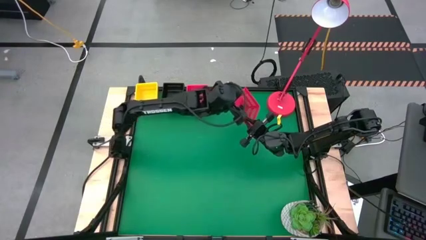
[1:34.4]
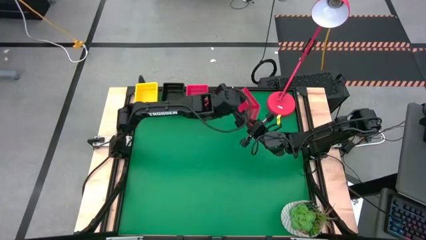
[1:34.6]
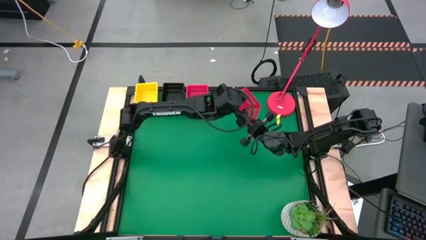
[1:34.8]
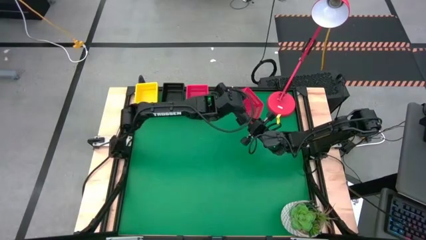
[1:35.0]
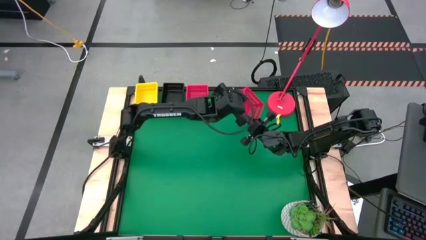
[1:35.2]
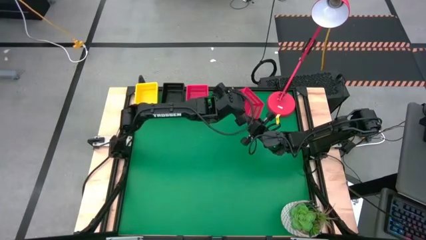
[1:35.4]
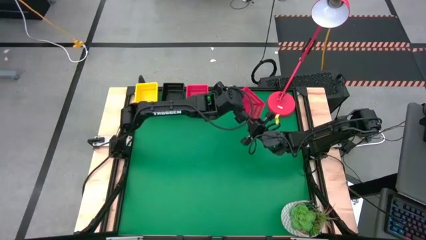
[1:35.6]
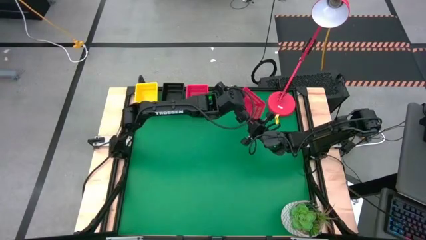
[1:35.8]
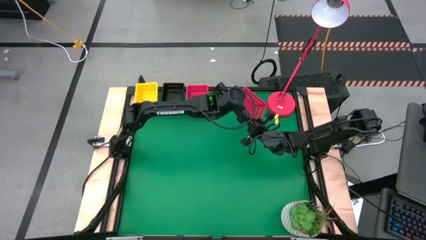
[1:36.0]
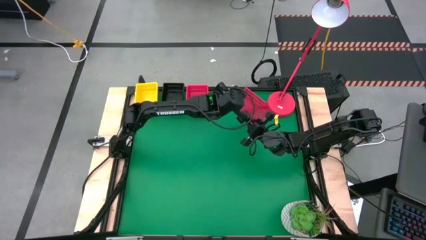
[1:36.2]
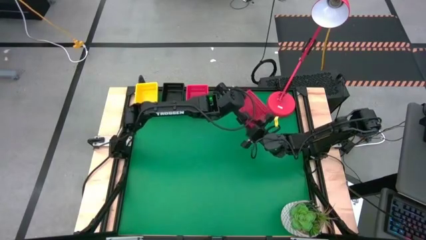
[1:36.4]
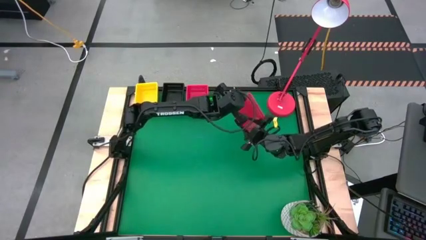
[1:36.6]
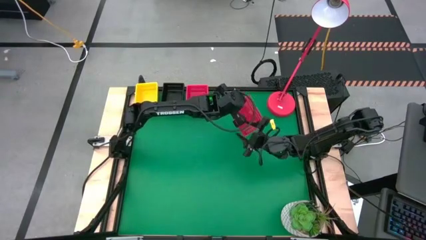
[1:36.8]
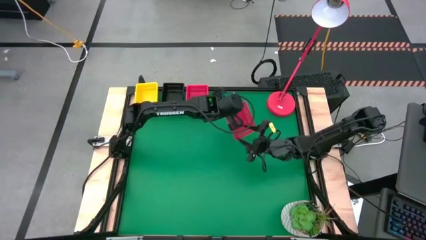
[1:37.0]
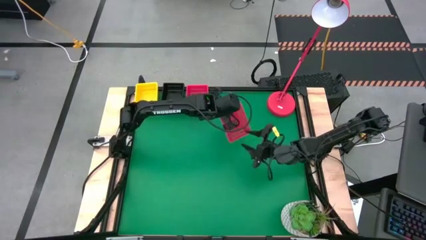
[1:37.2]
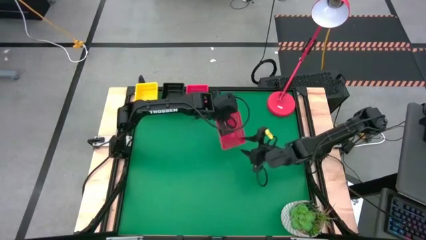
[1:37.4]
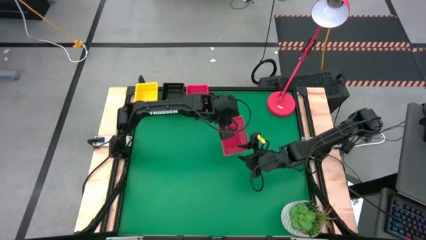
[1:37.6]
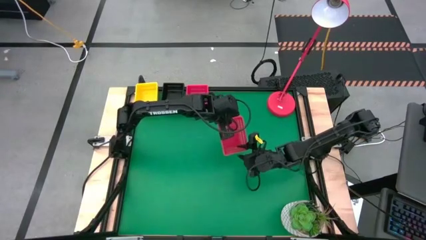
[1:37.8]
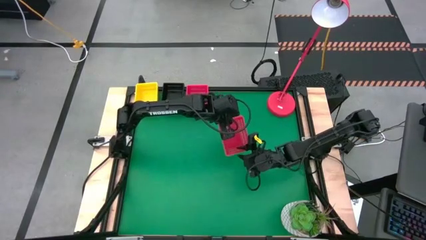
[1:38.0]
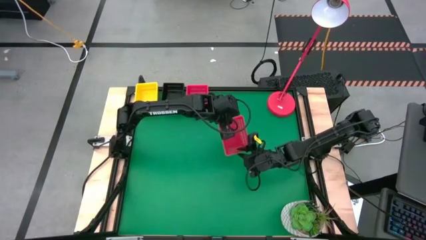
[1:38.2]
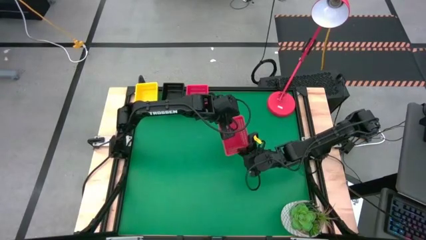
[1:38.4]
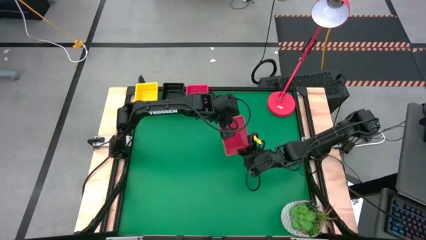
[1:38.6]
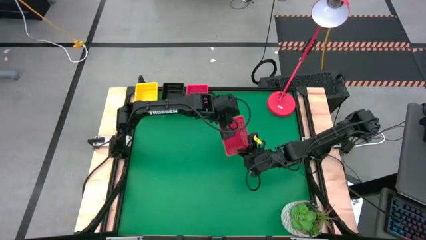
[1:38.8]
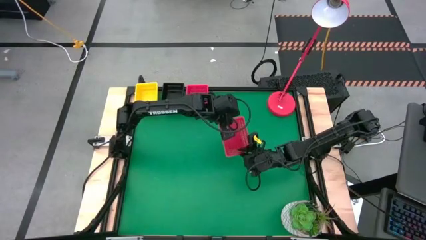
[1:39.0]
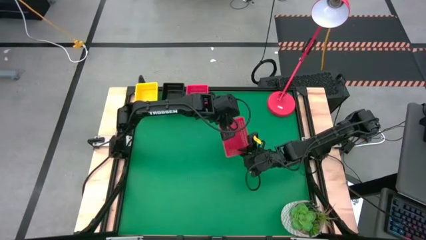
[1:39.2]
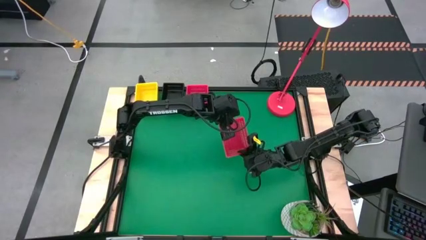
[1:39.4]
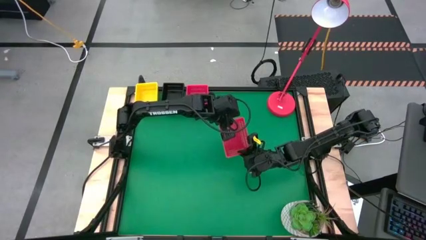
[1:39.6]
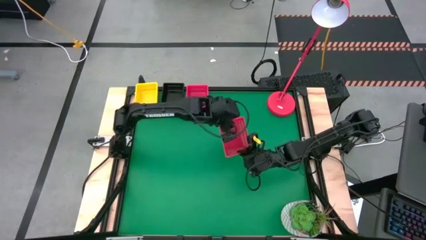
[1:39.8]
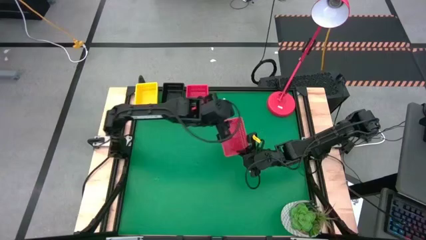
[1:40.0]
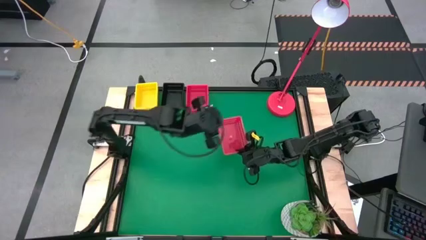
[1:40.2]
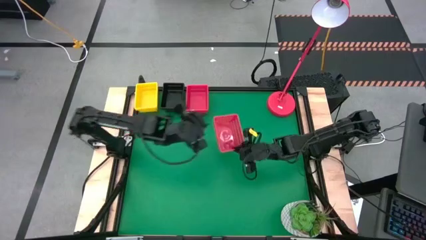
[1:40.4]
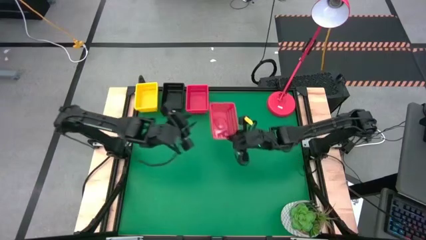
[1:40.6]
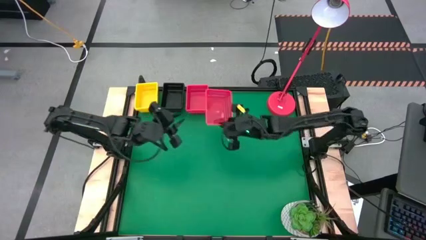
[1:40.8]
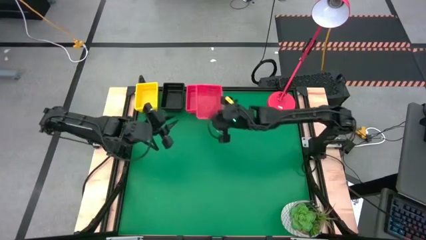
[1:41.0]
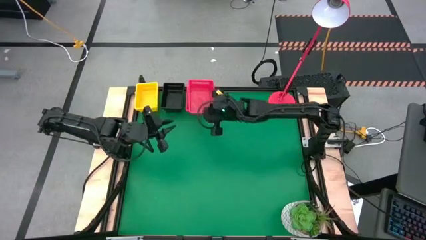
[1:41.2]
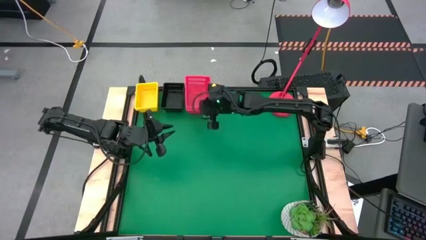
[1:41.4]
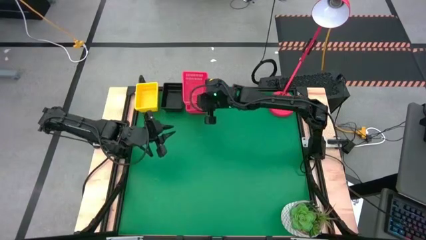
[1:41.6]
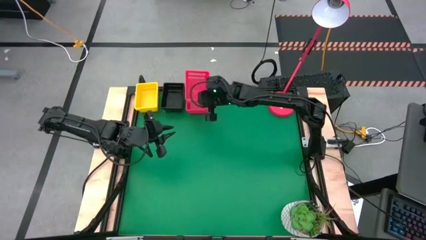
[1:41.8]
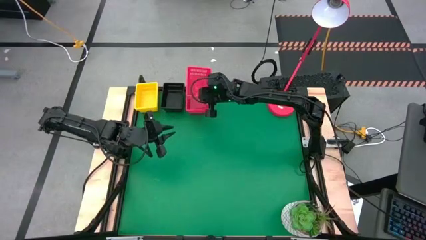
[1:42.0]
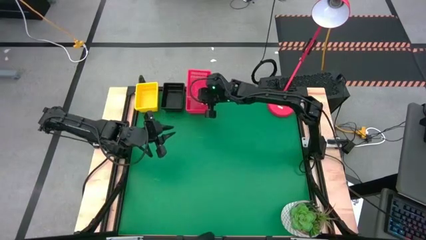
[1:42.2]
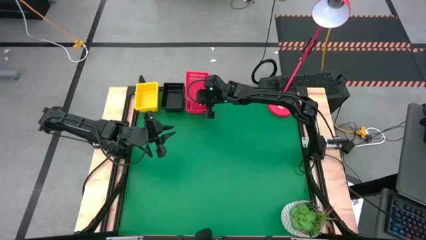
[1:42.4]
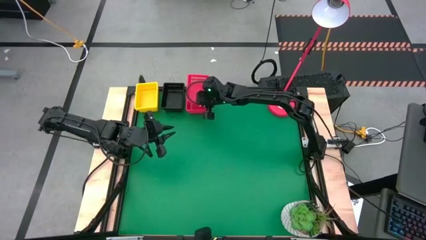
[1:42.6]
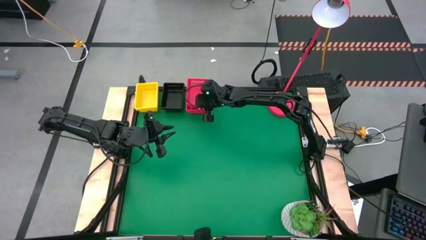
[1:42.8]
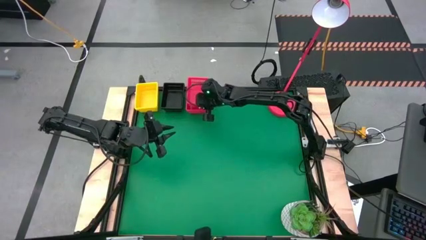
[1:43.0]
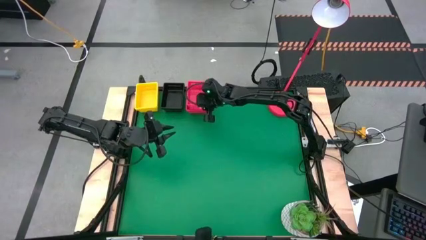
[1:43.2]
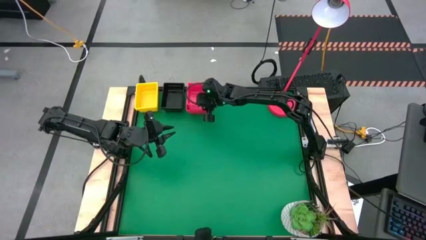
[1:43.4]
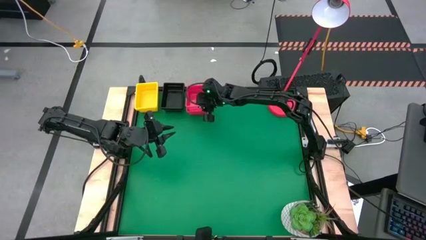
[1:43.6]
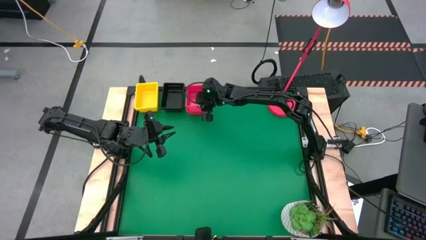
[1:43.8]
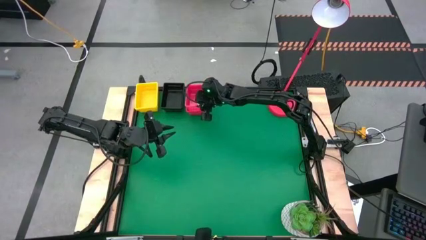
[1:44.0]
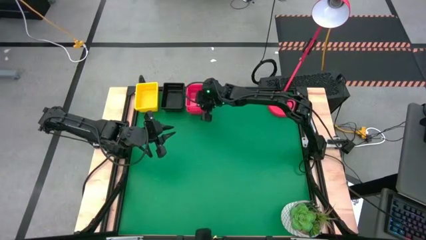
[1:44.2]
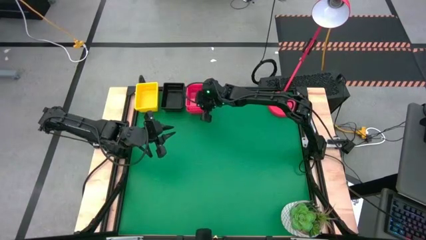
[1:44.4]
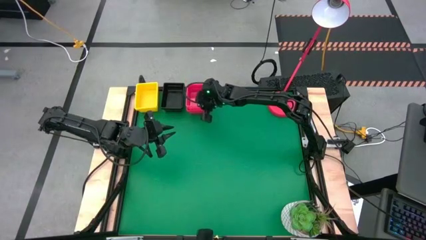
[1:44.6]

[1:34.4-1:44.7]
Stack the bottom red bin on top of the top red bin
